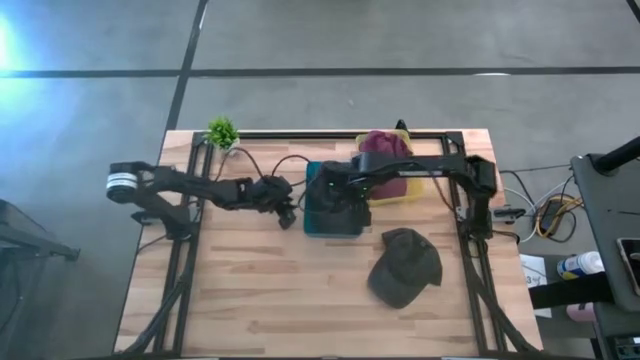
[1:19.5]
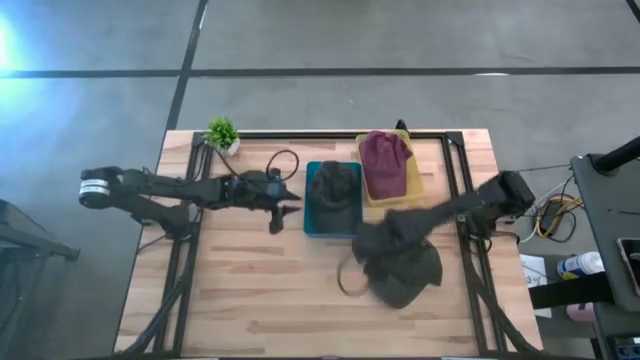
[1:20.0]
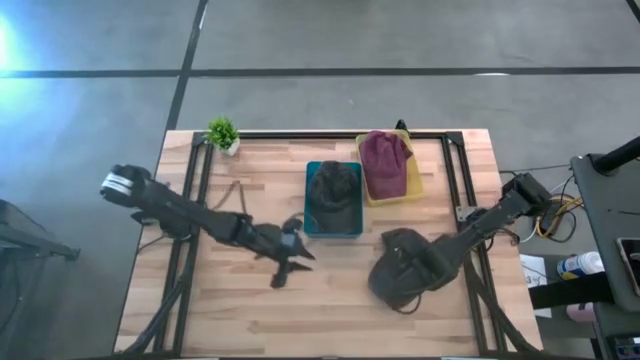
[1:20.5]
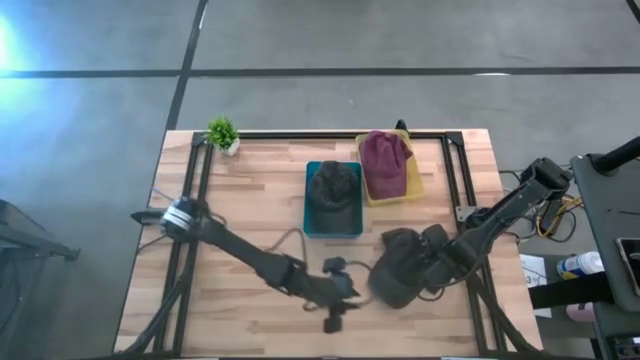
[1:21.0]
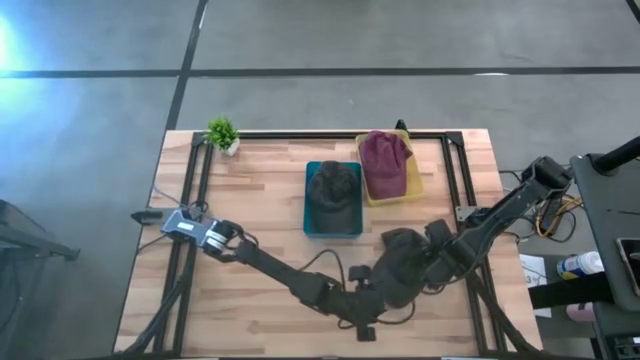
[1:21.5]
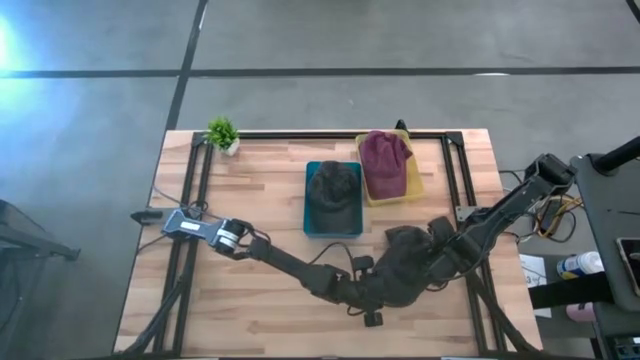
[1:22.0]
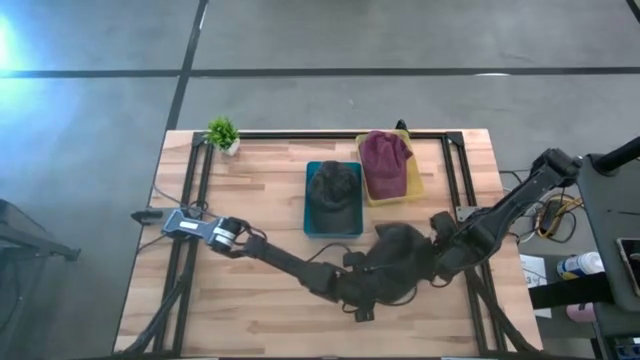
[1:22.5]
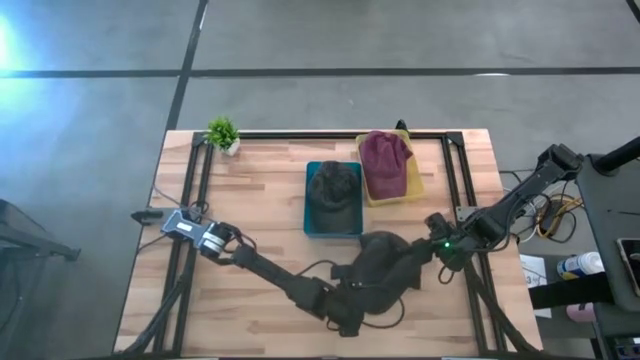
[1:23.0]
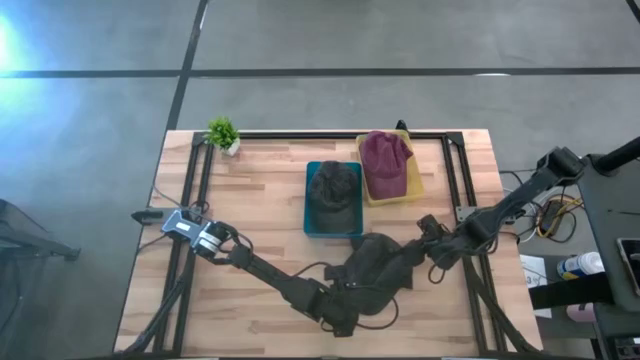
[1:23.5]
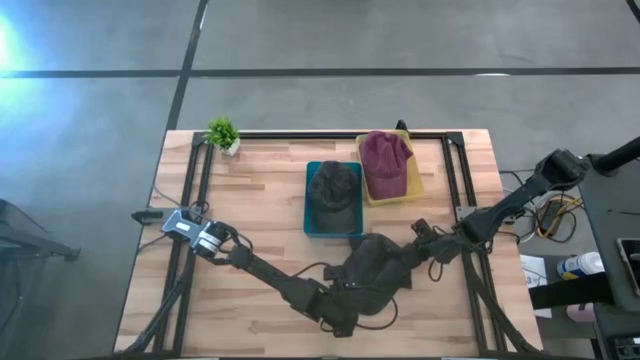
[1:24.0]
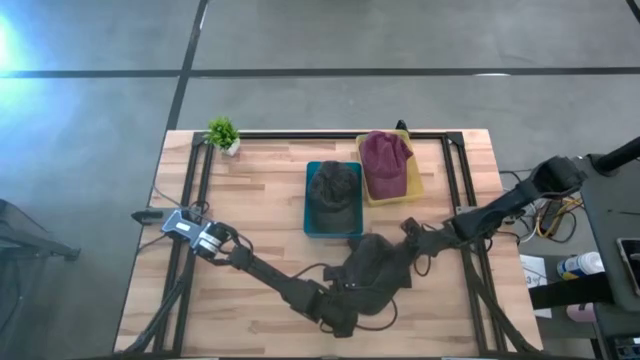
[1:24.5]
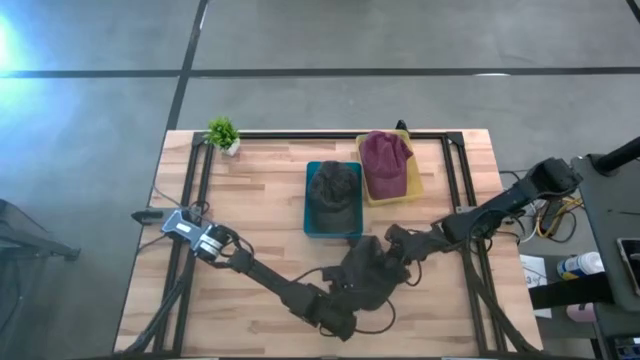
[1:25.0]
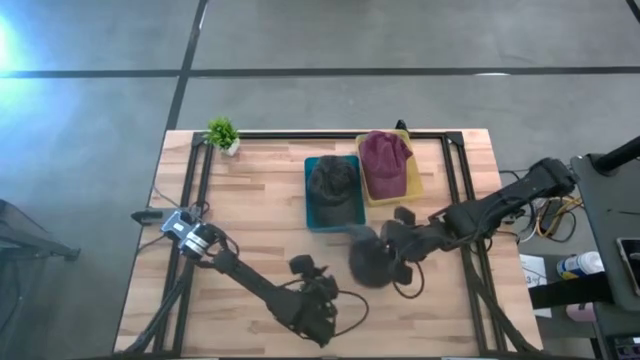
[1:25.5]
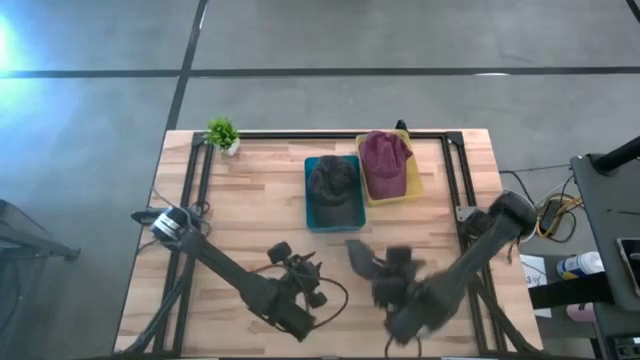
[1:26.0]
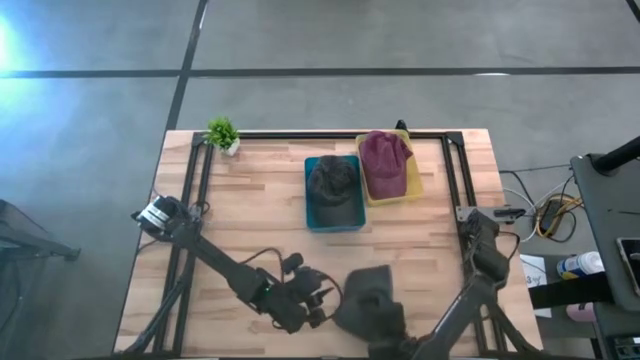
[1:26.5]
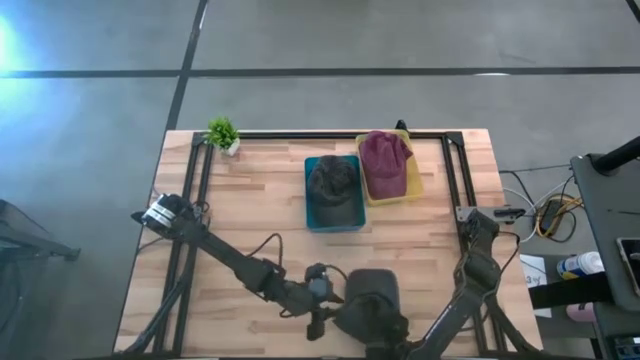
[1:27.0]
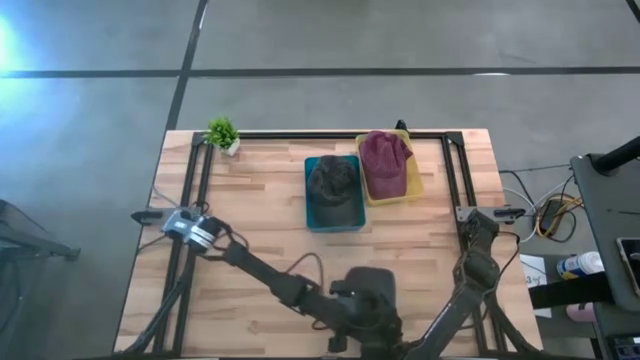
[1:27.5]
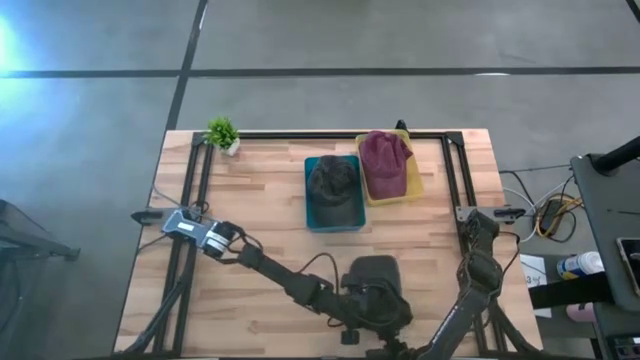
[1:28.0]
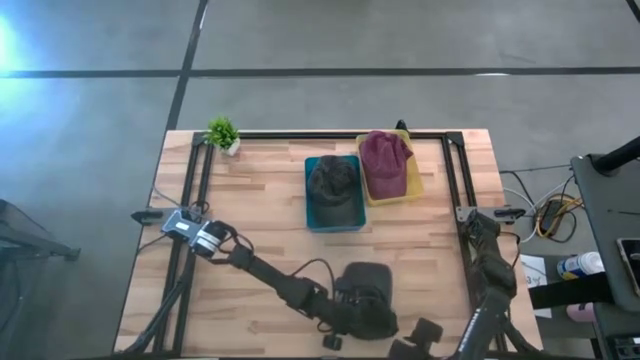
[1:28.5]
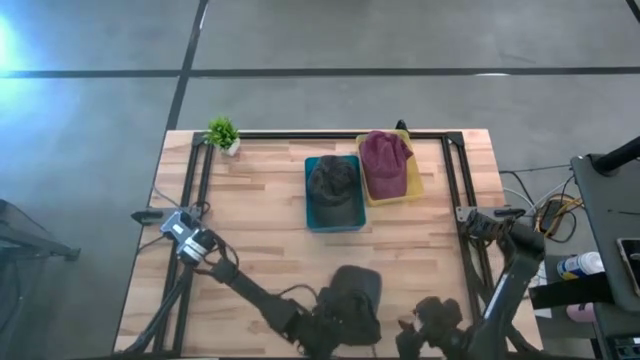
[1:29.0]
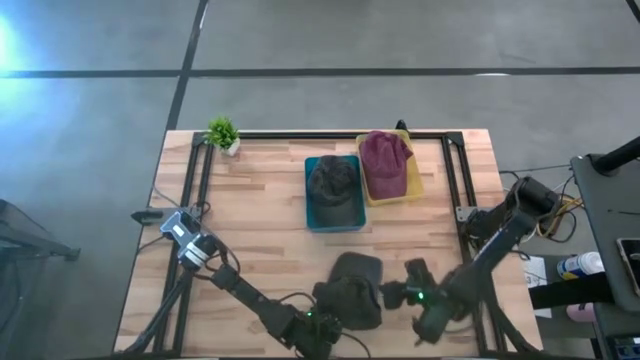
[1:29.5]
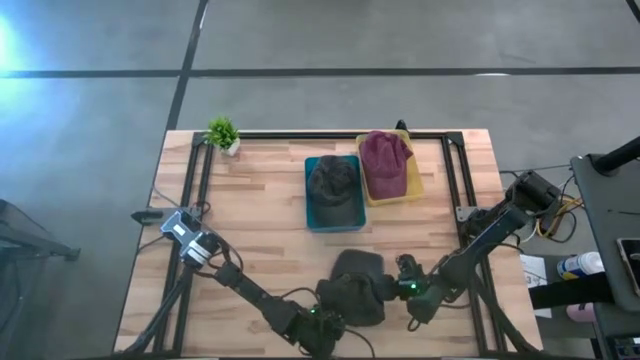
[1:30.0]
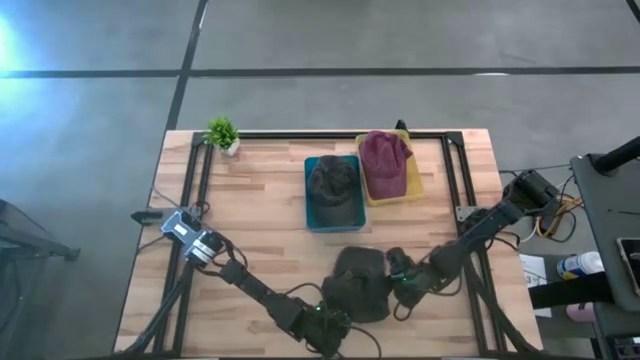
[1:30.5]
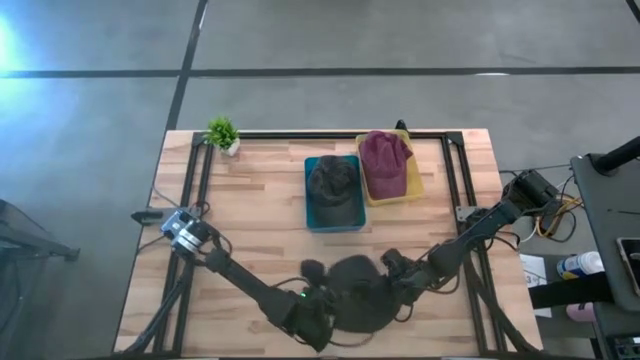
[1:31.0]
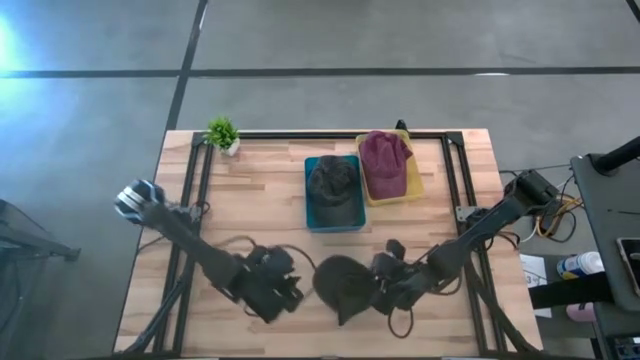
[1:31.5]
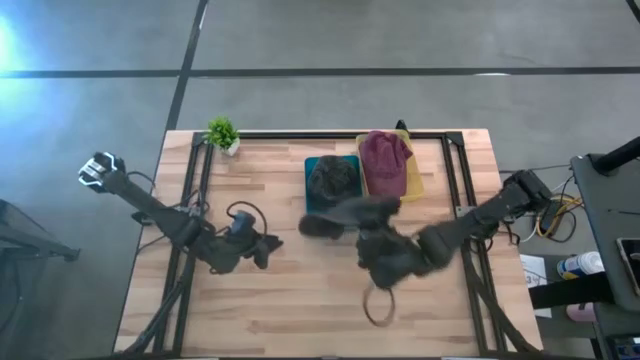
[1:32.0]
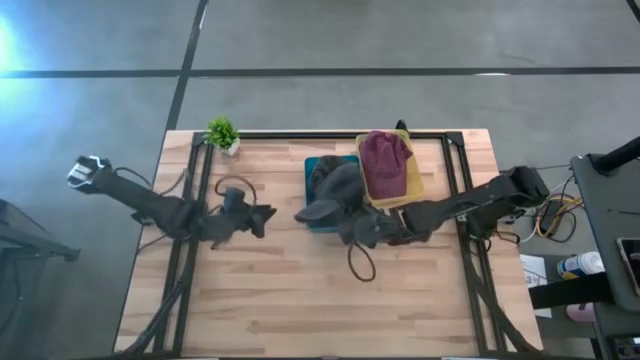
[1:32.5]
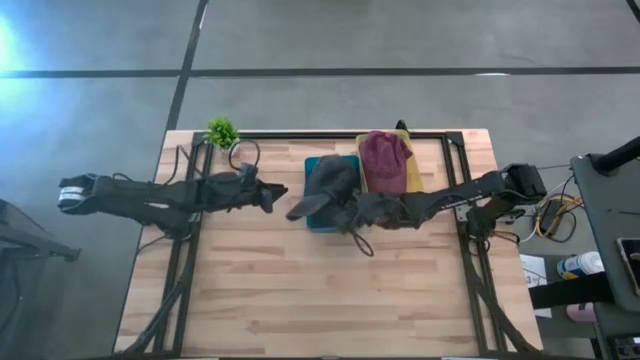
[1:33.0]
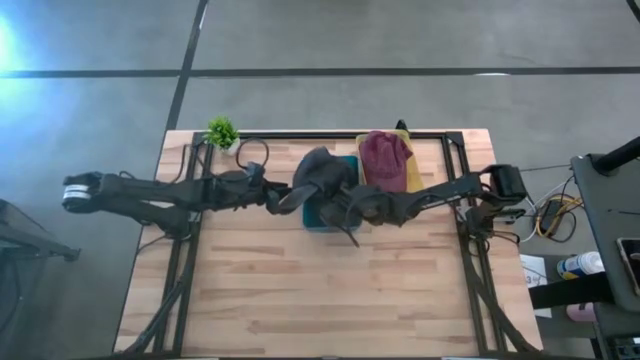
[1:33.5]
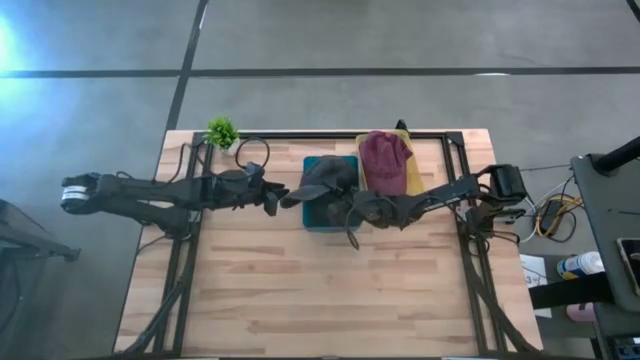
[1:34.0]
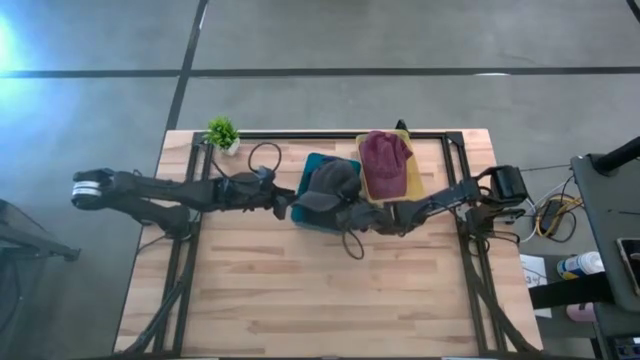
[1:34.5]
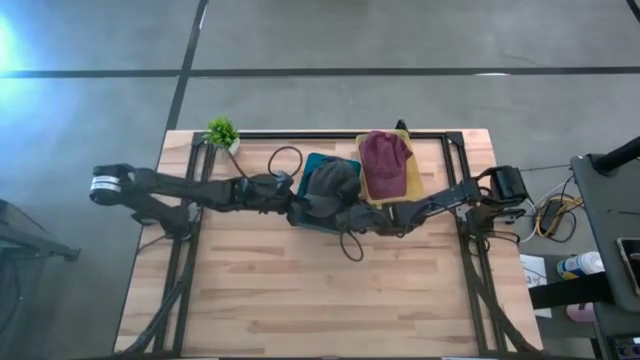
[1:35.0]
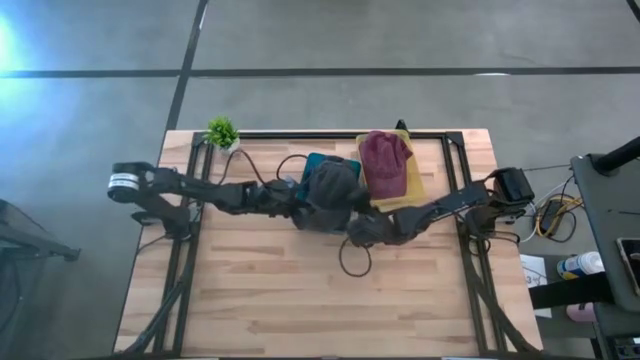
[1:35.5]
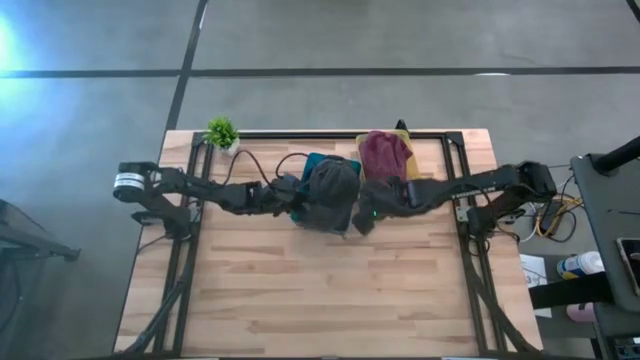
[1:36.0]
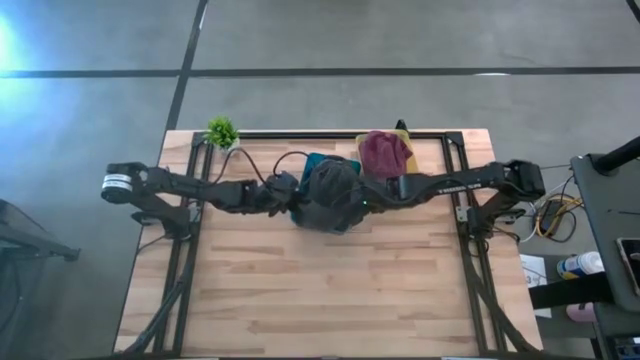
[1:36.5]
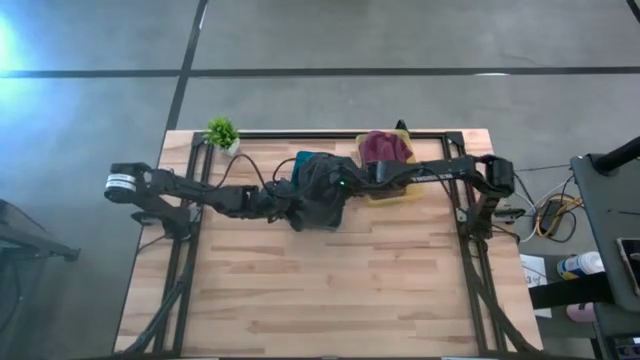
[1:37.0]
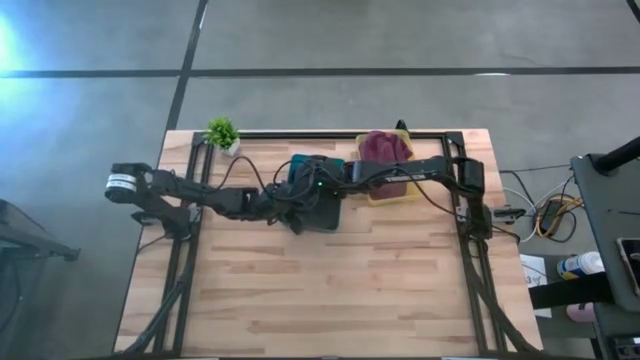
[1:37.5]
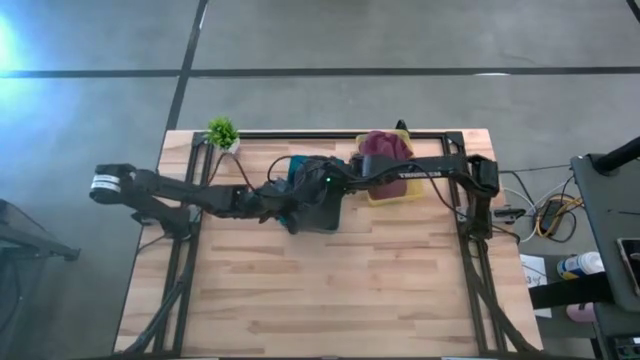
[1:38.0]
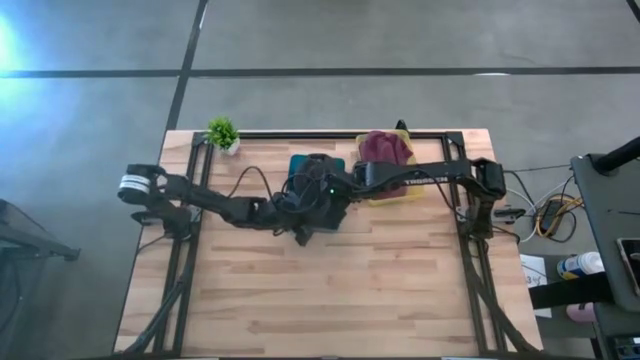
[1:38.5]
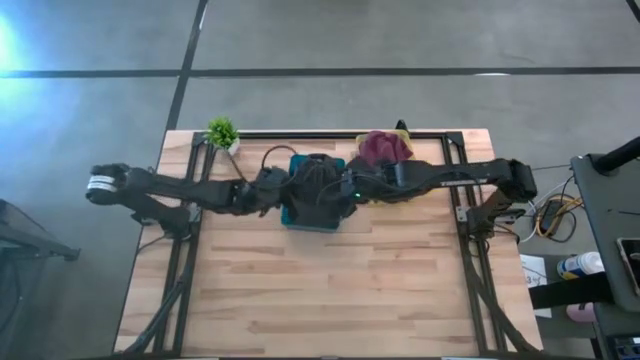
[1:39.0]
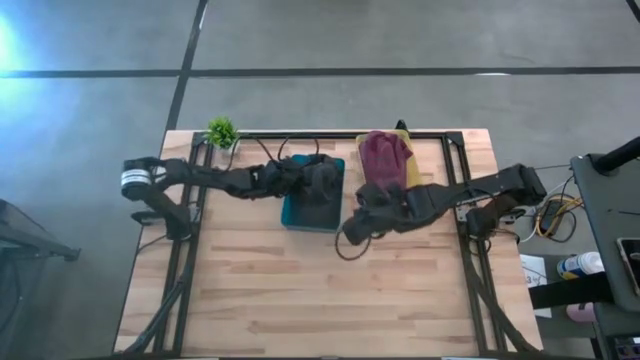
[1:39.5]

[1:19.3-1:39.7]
Task: Pick & Place hat
Put the black cap into the blue bin
